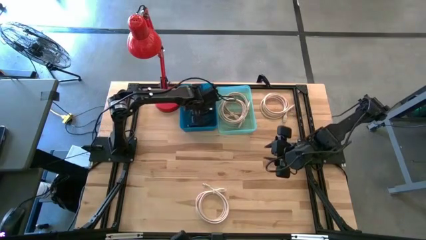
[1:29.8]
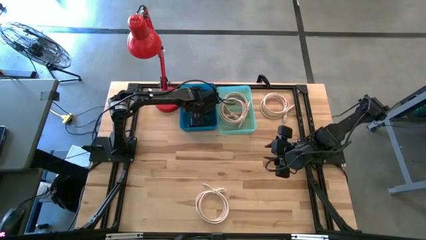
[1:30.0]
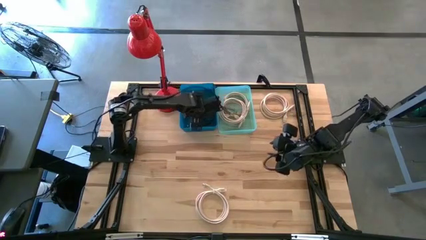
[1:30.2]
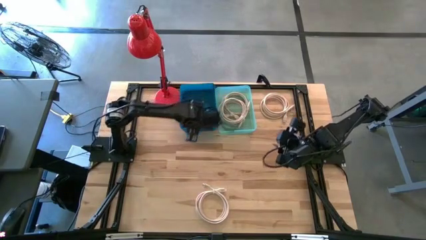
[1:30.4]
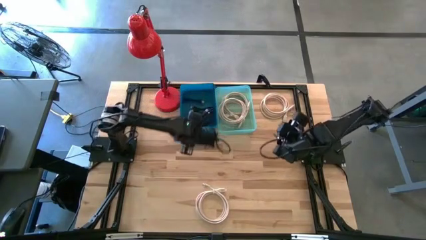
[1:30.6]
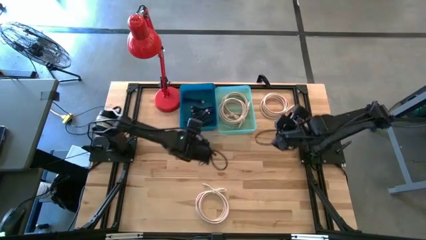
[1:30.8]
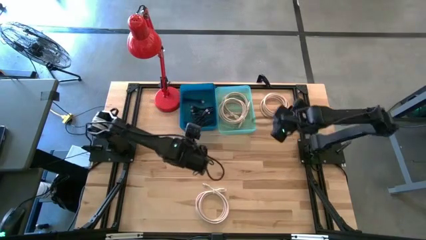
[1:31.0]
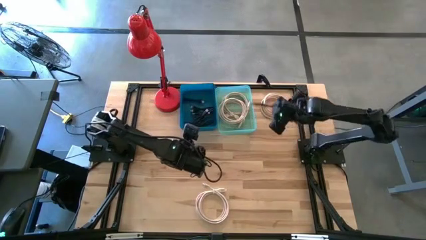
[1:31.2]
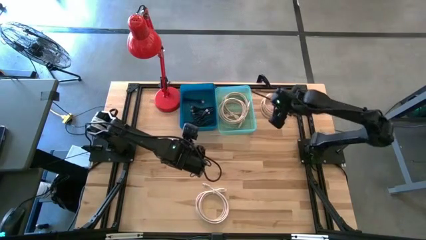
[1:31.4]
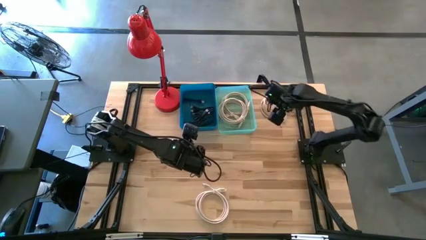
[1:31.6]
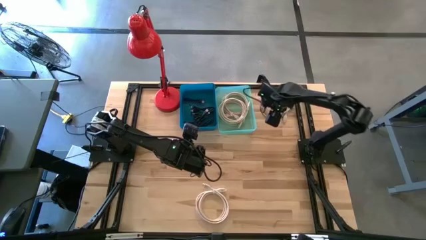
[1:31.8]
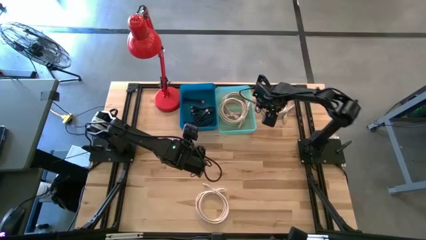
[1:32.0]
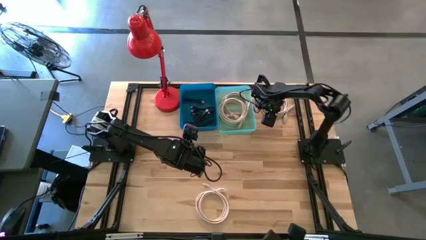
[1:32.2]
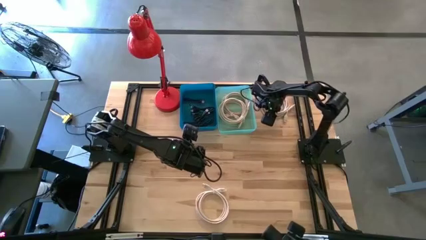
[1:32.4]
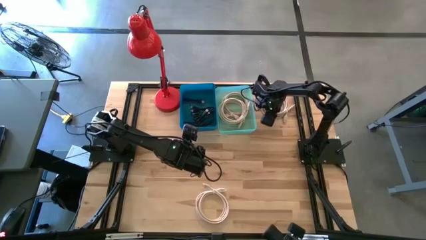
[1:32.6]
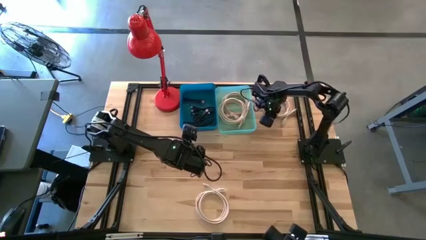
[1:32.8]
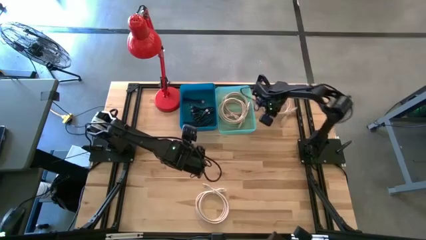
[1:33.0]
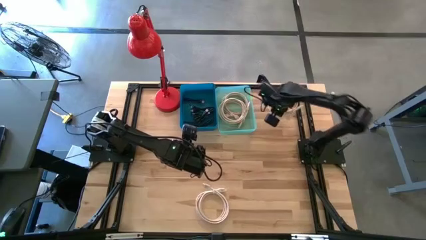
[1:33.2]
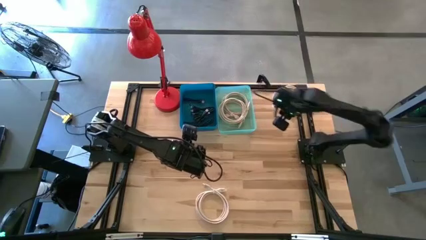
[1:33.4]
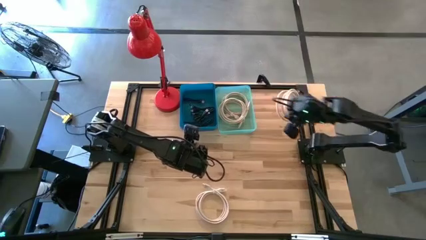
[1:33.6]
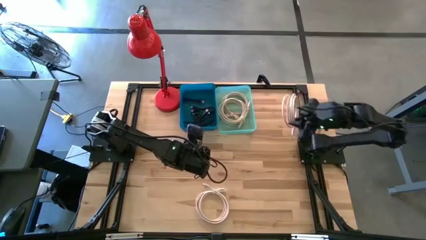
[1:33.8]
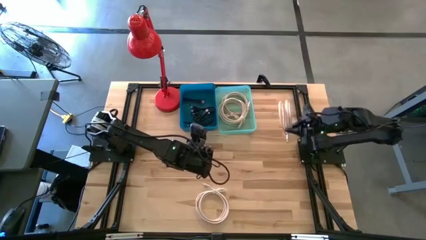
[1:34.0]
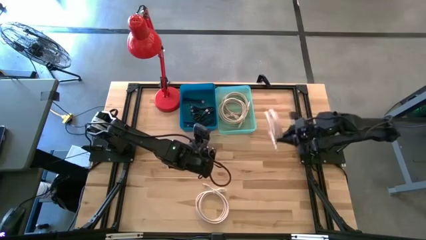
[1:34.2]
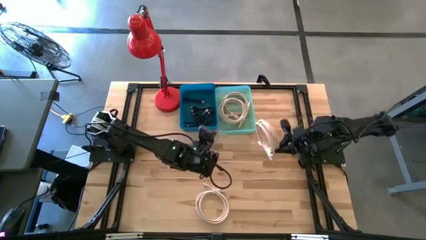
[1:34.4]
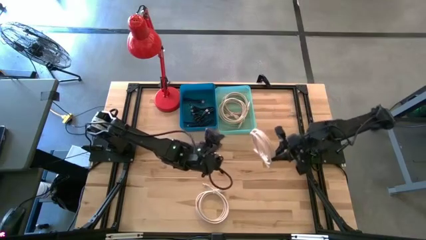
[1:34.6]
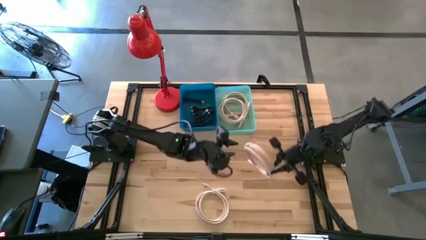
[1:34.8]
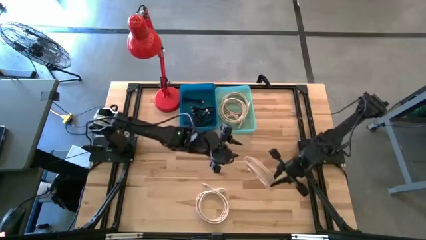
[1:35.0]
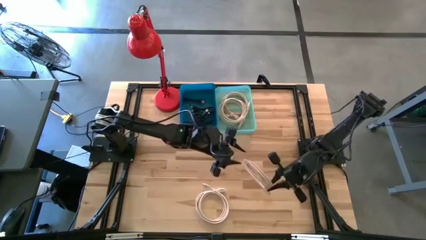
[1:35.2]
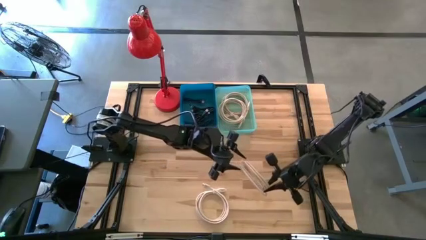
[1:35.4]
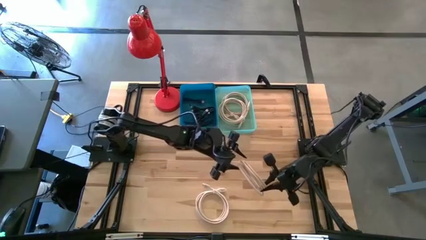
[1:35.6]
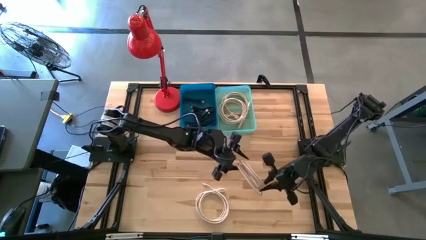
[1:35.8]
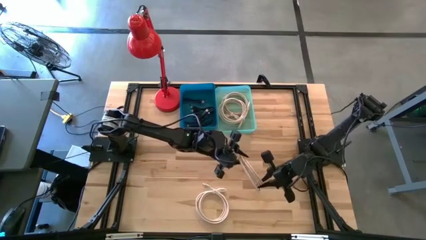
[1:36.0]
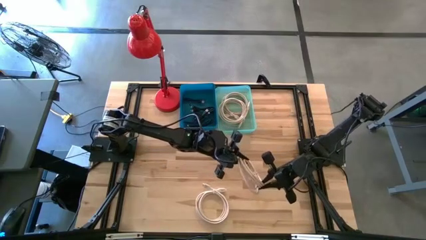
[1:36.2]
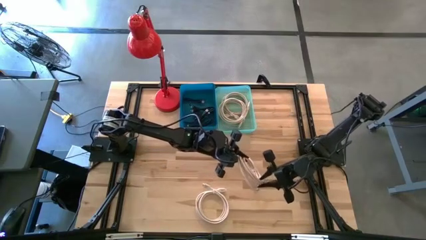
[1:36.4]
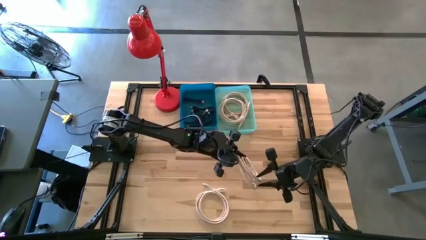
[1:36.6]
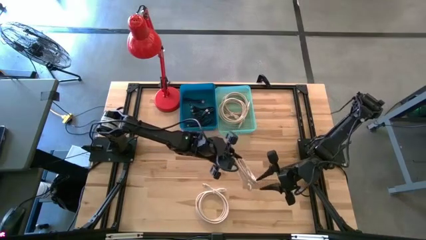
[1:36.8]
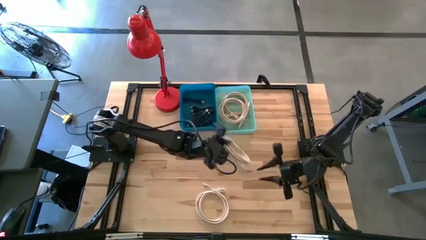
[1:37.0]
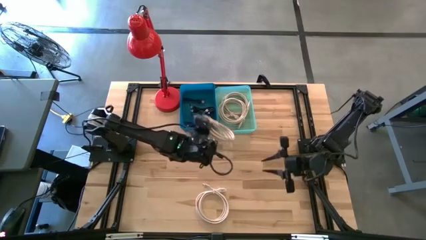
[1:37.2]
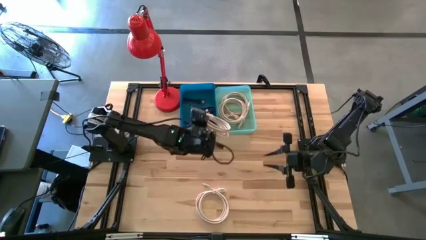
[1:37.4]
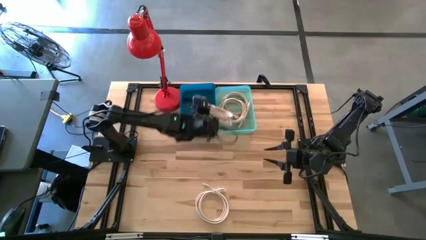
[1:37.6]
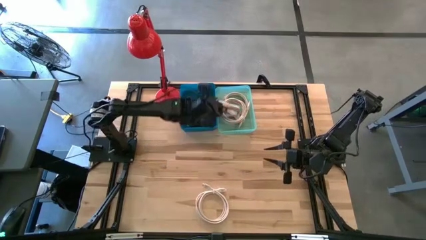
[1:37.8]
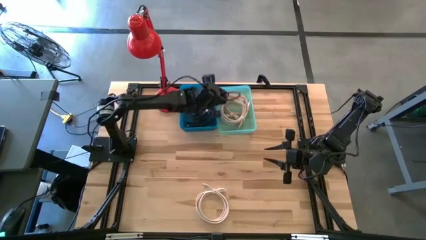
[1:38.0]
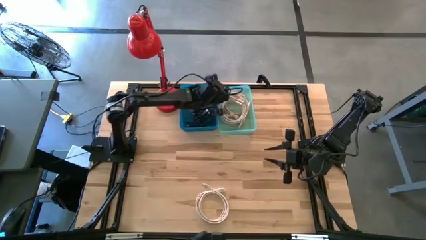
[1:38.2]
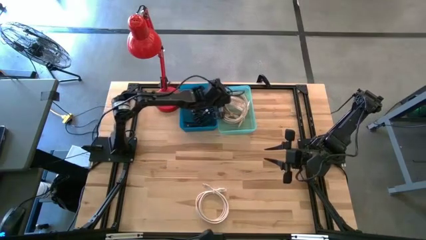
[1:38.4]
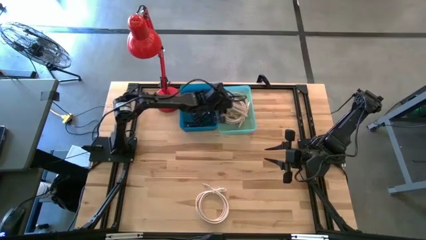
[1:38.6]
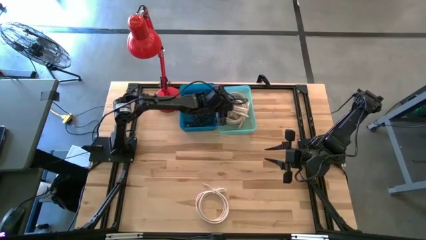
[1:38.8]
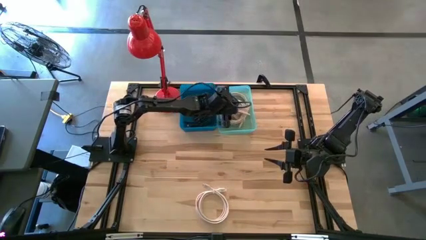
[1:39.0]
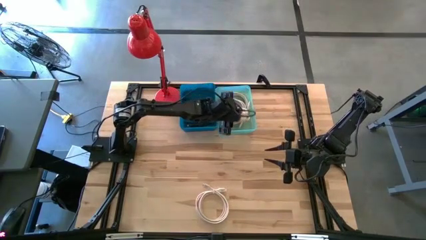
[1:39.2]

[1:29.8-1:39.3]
Task: Pick & Place USB Port
Put the brown HDMI cable into the green bin

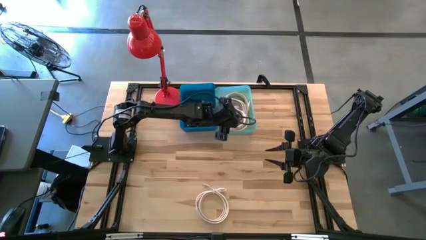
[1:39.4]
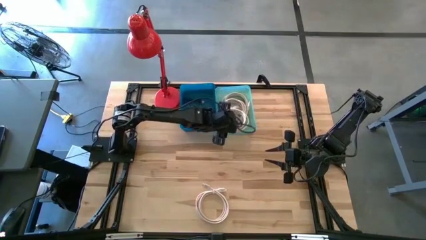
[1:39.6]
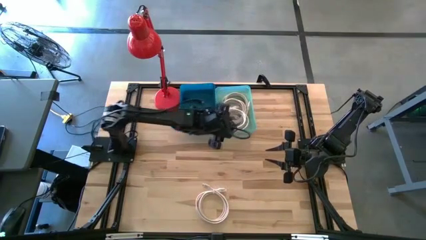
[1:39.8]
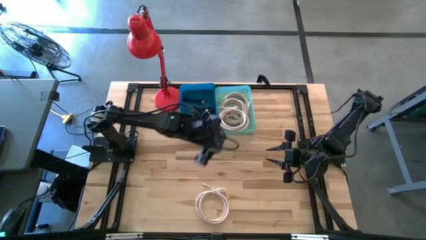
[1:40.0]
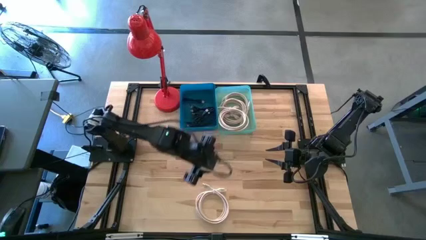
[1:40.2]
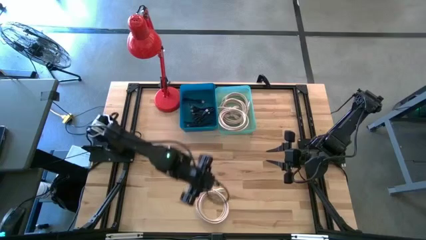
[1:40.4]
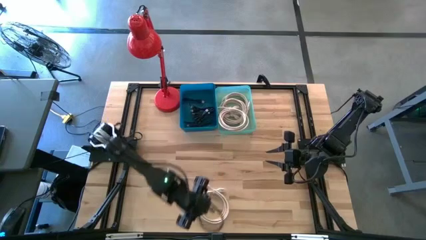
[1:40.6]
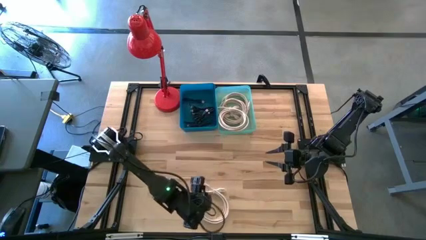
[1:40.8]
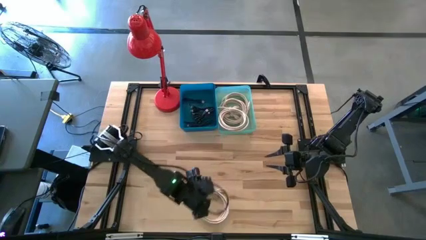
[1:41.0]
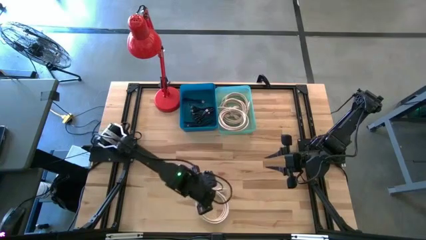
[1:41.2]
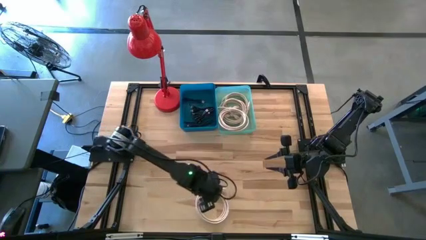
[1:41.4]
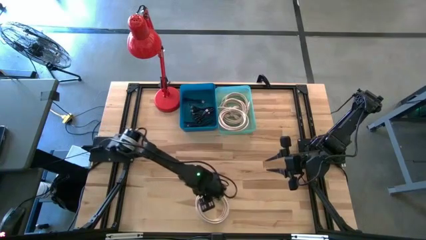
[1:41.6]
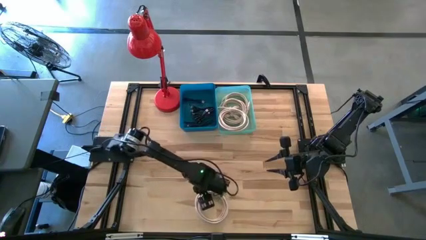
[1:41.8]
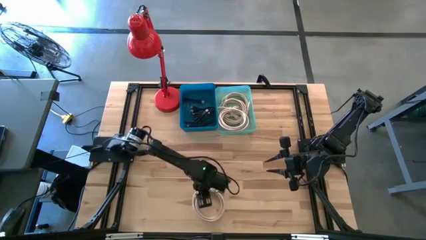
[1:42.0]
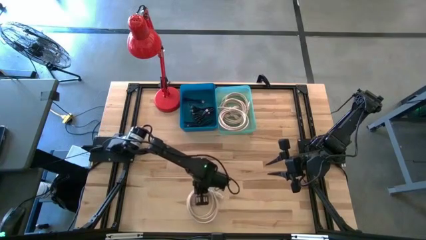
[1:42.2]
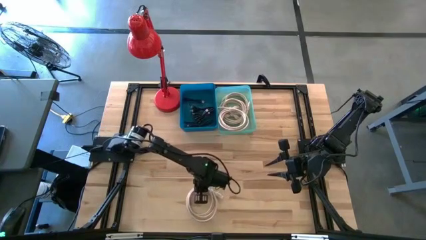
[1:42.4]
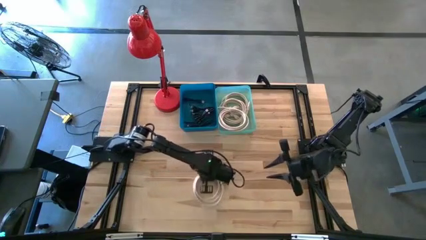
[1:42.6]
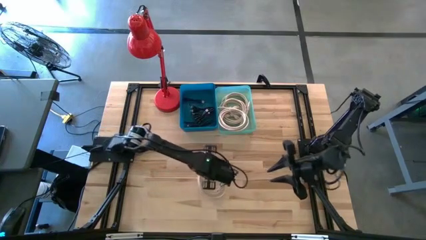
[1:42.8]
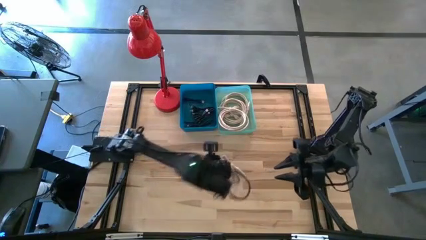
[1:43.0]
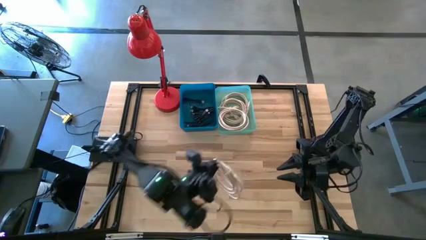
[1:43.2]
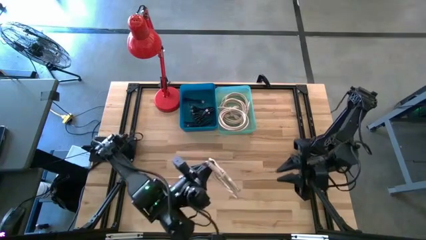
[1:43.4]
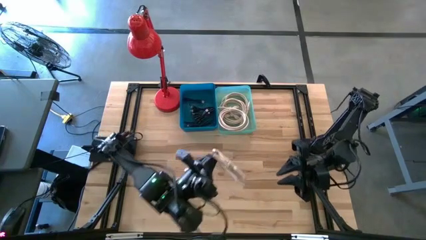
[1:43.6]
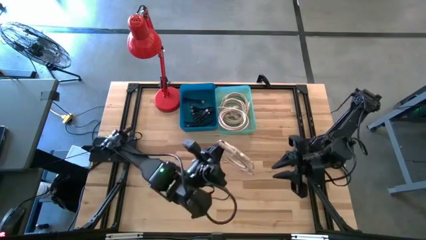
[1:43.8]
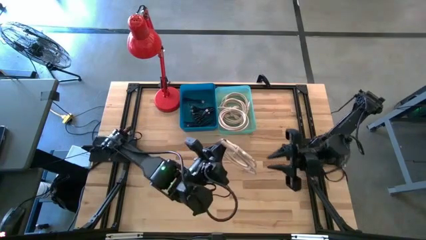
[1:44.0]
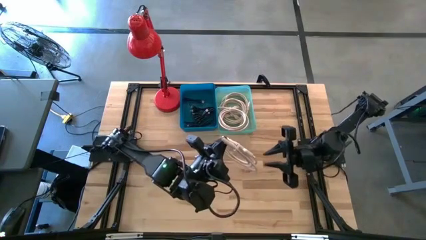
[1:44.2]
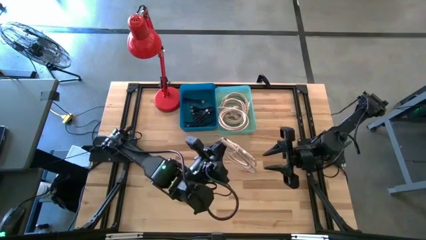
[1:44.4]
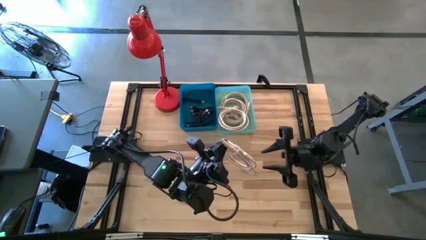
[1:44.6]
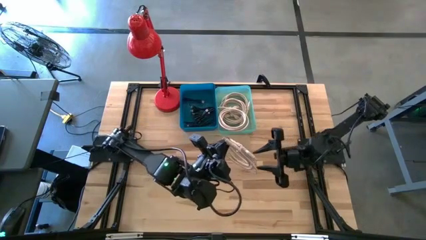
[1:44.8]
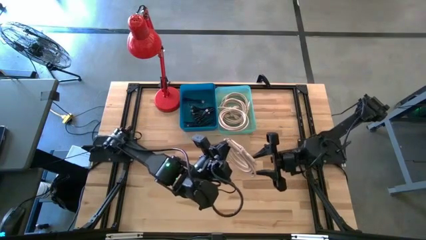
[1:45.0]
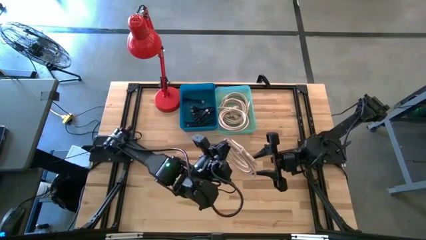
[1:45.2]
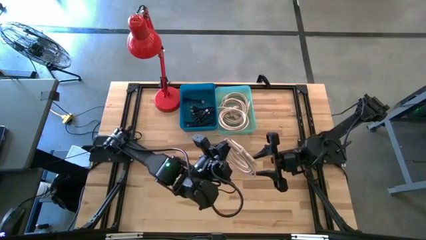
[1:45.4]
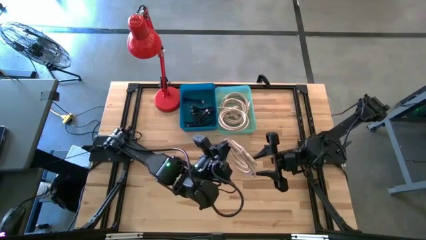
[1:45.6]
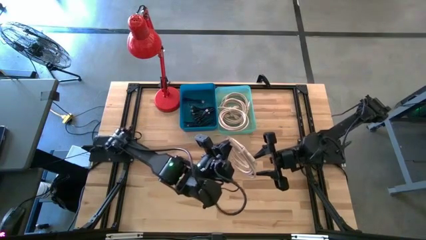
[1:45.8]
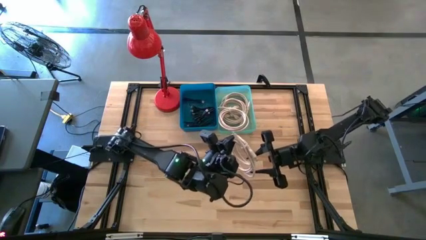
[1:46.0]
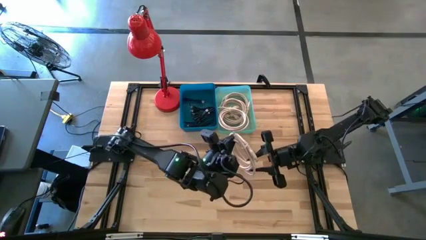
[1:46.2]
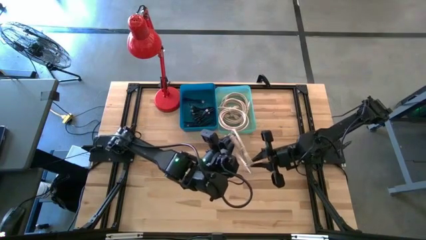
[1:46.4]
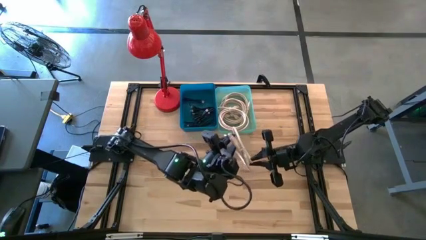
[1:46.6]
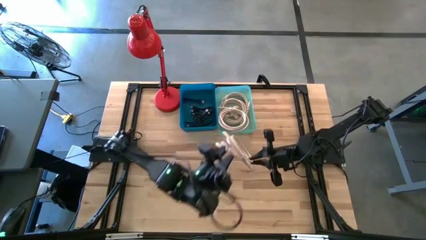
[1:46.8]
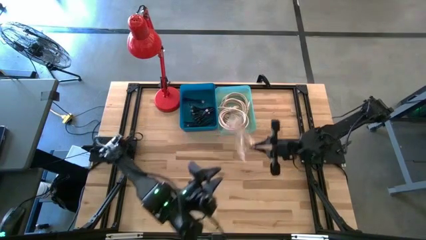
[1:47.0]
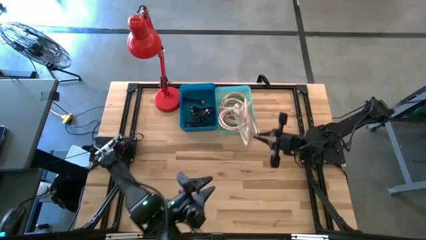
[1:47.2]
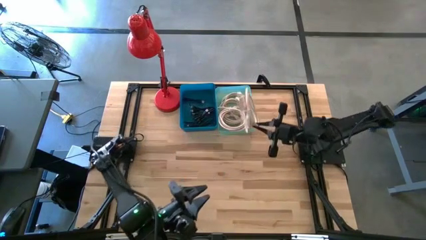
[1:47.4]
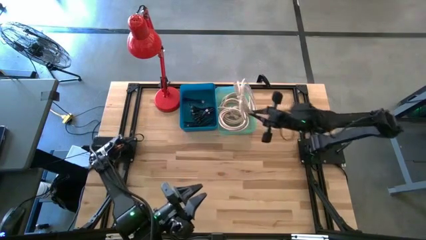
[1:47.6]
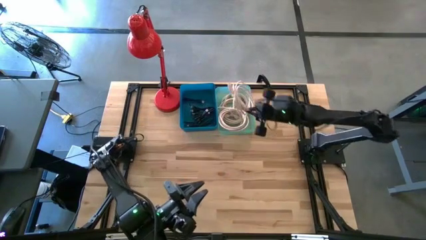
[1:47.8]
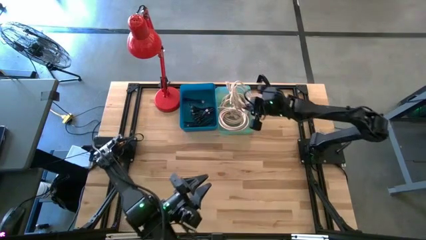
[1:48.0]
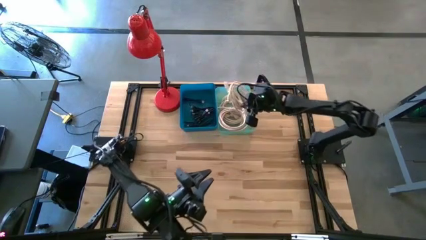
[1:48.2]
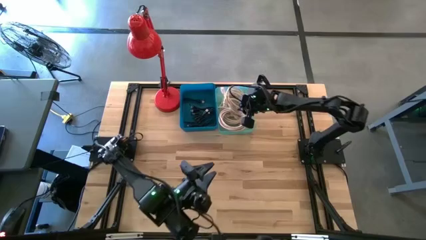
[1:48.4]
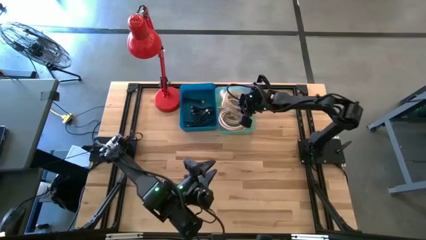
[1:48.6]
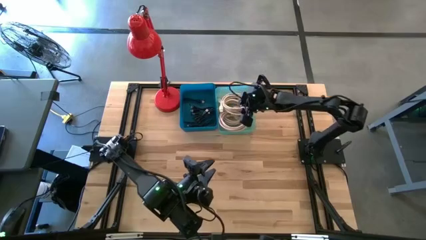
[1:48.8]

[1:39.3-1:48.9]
Put the brown HDMI cable into the green bin
